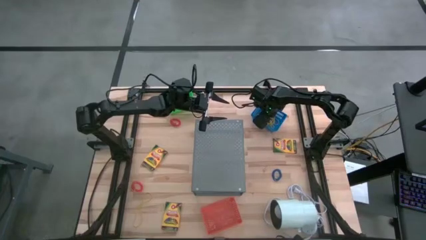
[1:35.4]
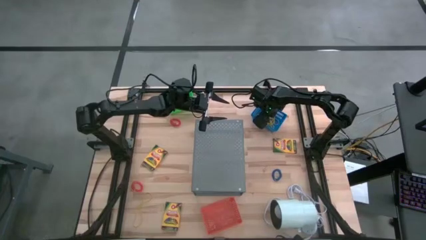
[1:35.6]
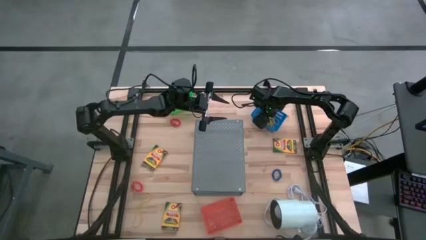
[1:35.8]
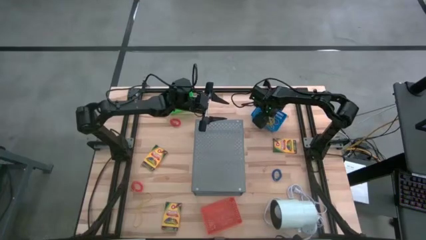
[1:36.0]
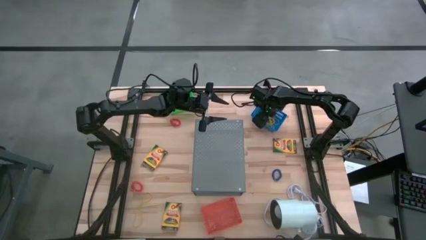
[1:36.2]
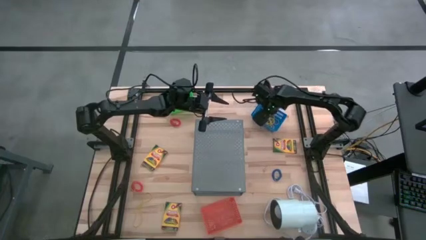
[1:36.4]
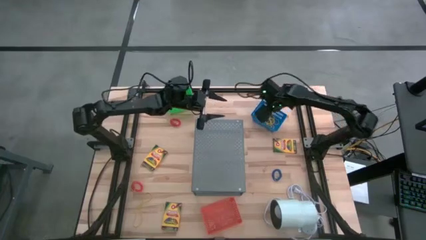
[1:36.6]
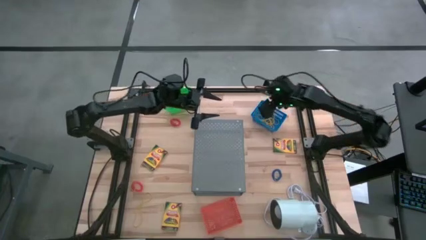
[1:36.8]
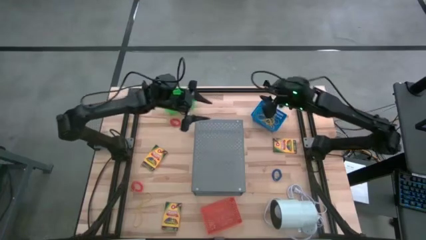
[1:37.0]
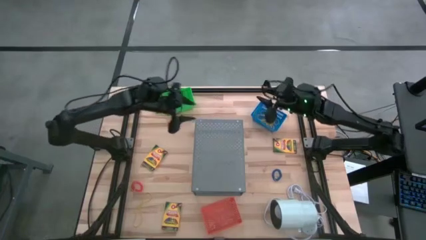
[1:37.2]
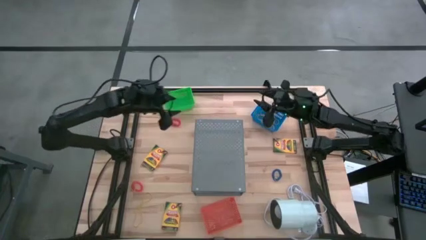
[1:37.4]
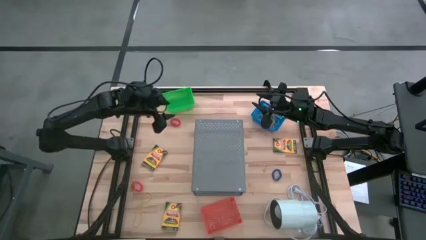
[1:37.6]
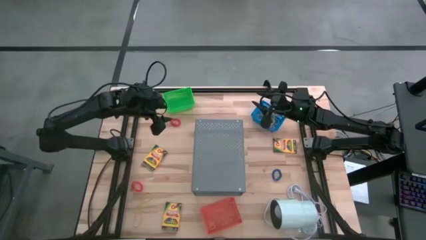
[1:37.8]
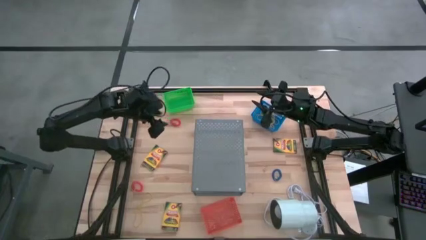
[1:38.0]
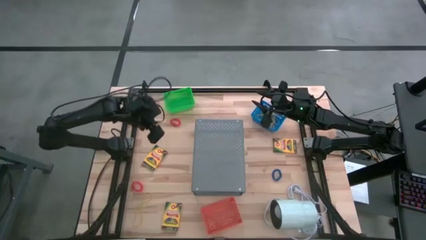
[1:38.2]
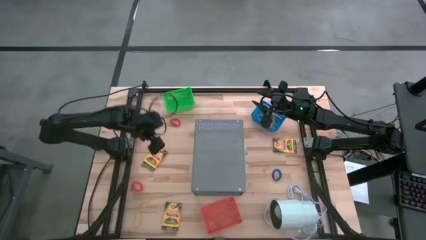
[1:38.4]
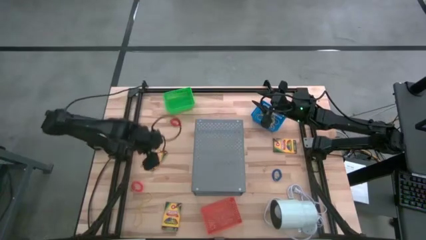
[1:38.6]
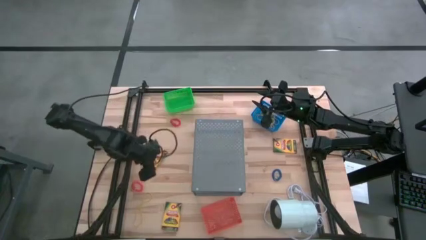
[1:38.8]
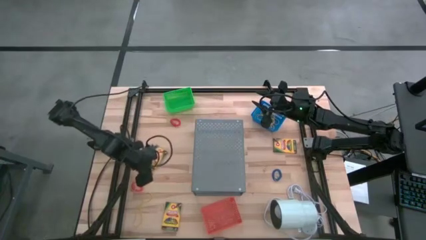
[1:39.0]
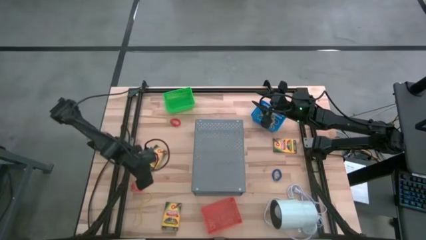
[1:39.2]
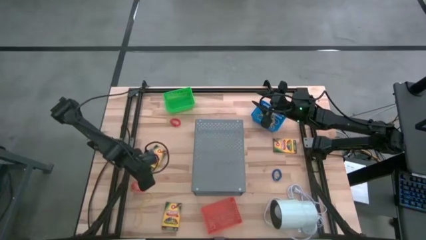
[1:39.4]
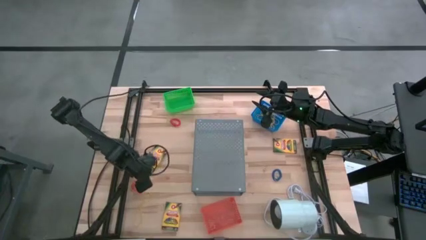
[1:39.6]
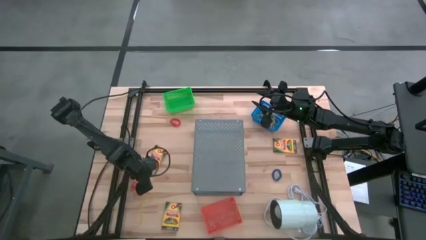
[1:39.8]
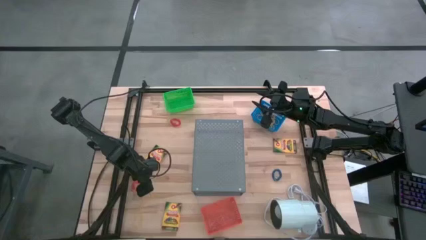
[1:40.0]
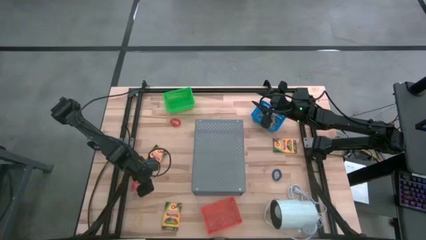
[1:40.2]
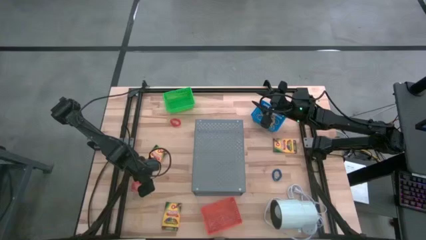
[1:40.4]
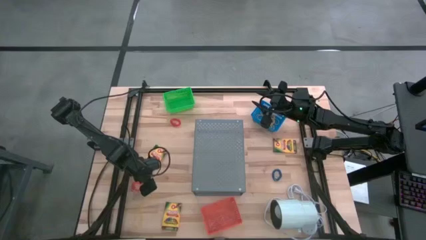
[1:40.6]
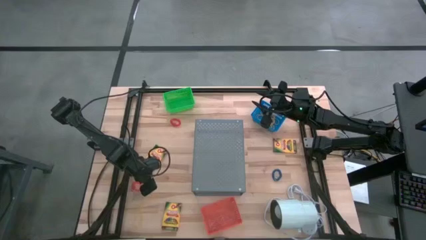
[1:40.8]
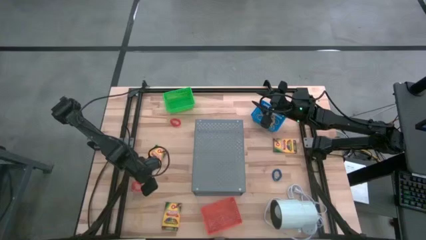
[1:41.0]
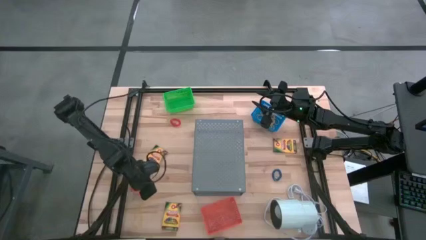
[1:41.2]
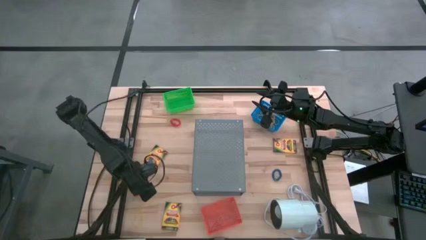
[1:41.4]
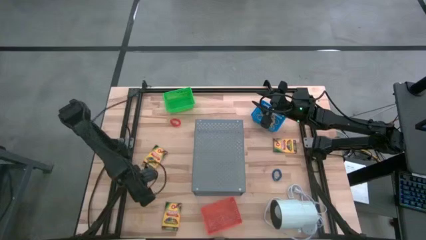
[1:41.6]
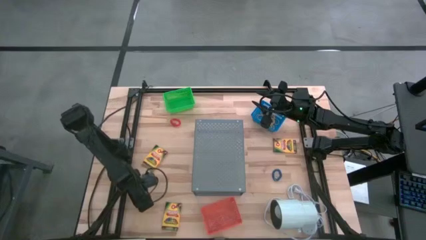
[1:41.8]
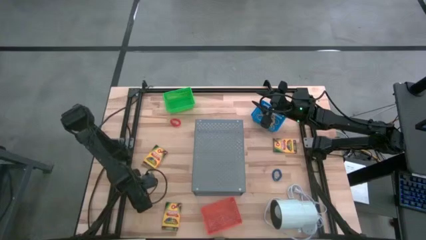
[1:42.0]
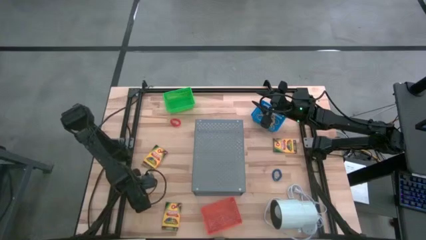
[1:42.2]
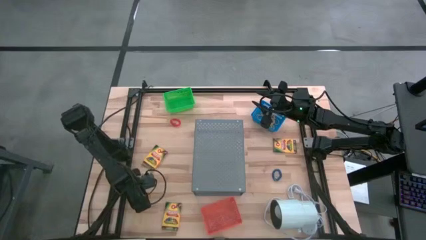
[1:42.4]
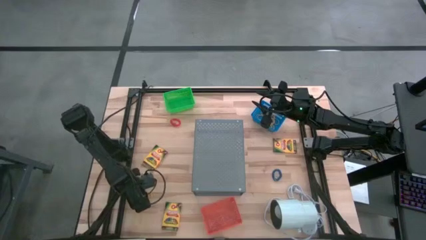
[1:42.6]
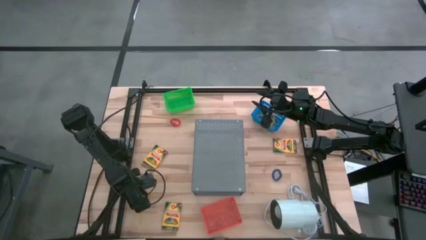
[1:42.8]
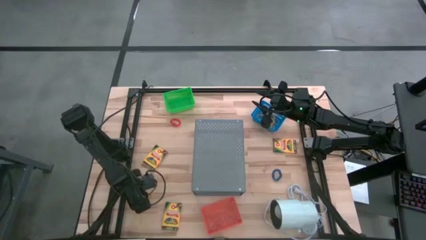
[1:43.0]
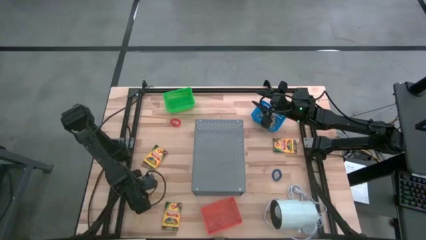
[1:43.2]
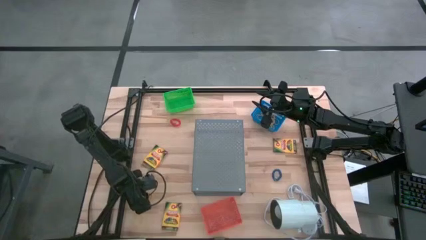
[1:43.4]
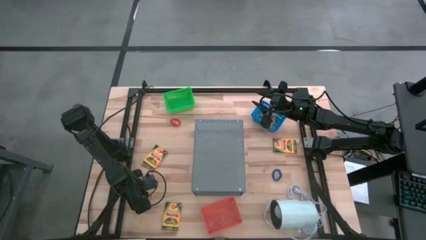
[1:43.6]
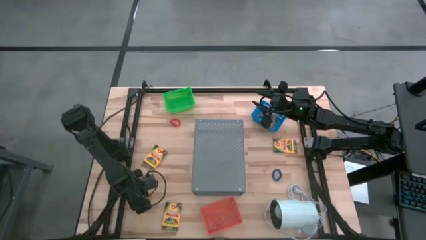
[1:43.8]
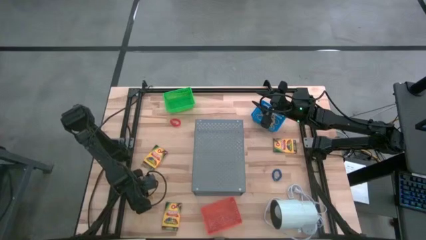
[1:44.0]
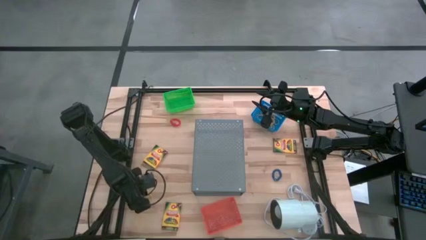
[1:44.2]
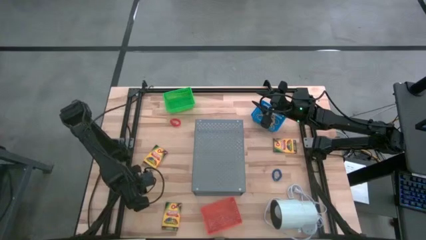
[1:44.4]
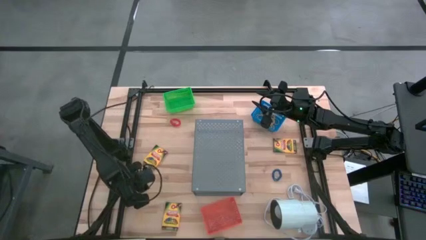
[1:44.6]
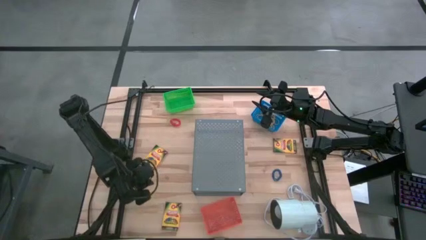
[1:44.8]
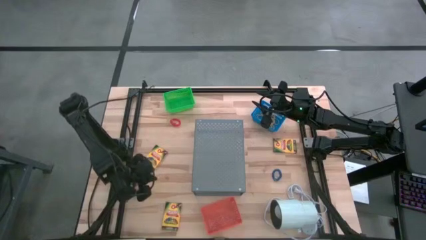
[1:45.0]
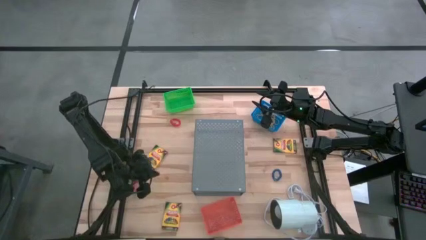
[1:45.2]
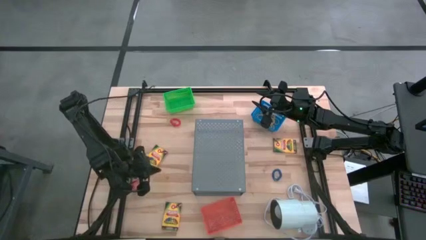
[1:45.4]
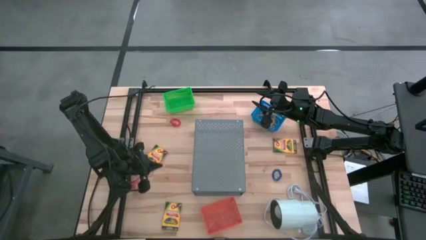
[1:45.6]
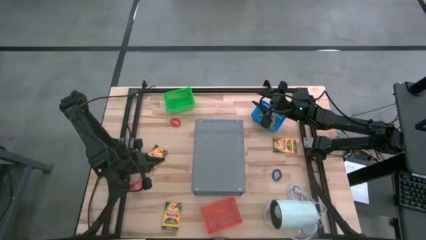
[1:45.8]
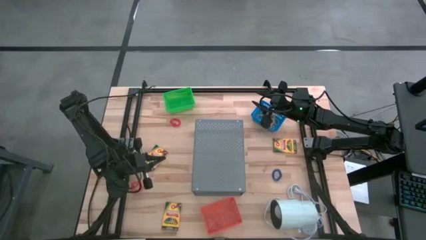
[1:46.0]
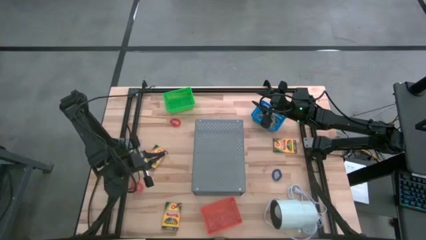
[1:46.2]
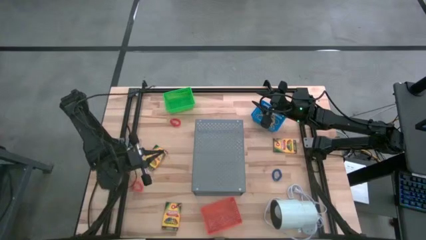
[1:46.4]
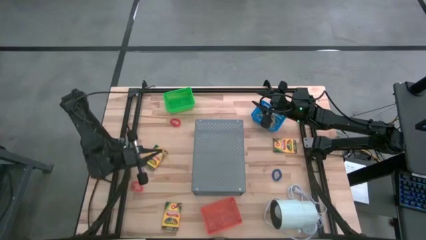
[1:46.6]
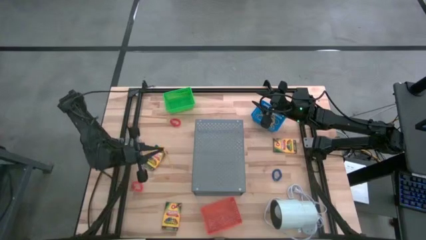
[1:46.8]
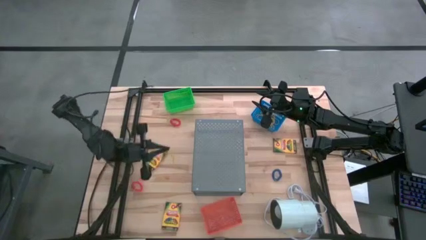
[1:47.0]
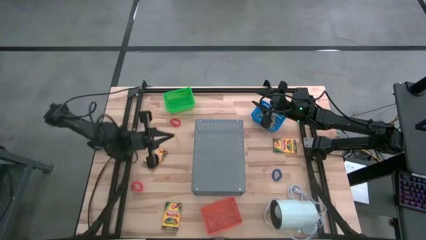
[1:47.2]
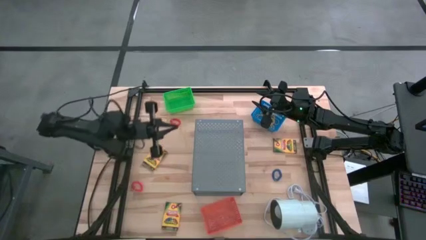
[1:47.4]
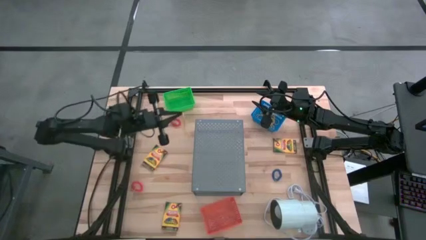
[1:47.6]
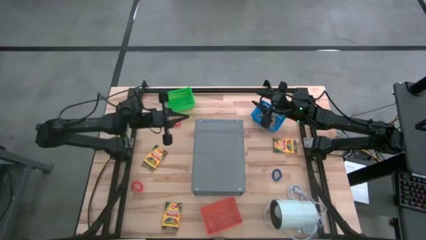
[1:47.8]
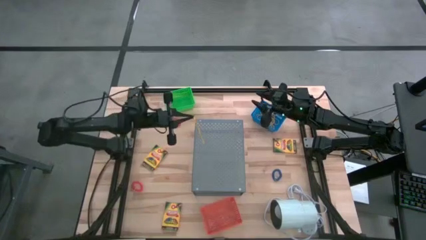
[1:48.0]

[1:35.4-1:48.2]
Task: Pick & Place Office Desk Supplies
Put the yellow rubber band into the blue basket

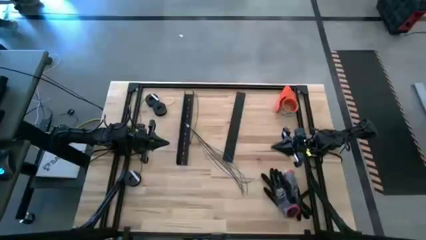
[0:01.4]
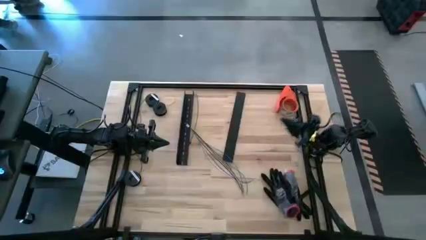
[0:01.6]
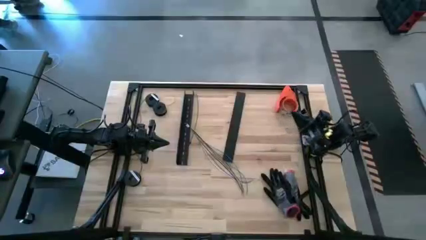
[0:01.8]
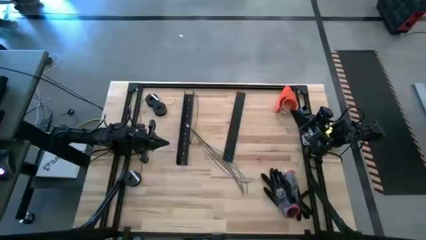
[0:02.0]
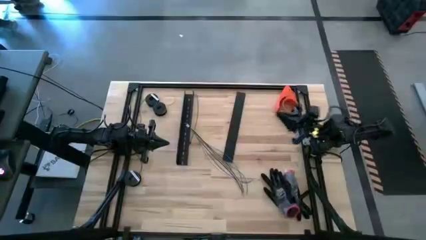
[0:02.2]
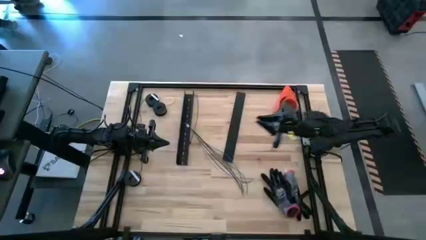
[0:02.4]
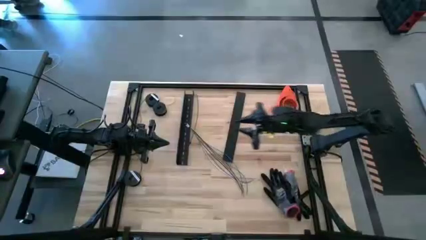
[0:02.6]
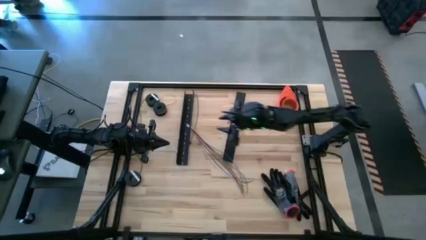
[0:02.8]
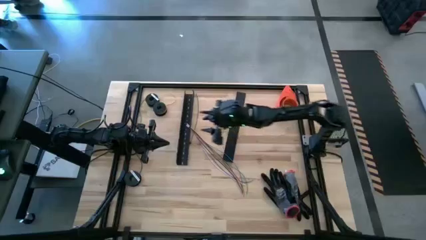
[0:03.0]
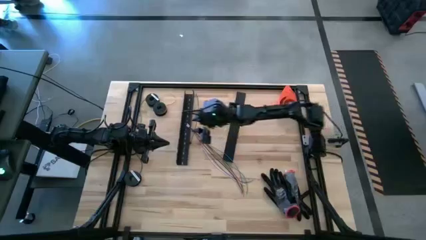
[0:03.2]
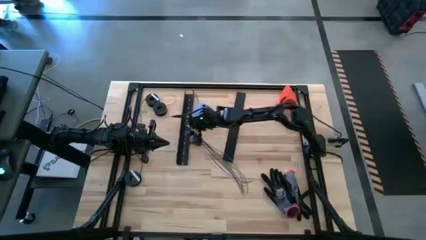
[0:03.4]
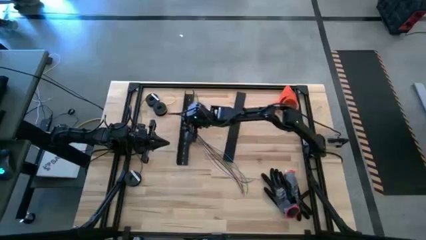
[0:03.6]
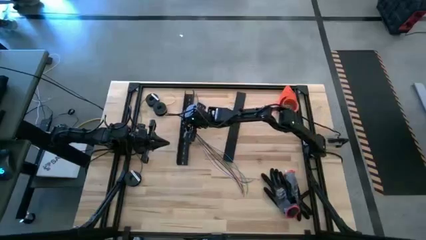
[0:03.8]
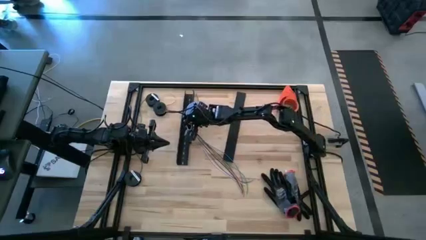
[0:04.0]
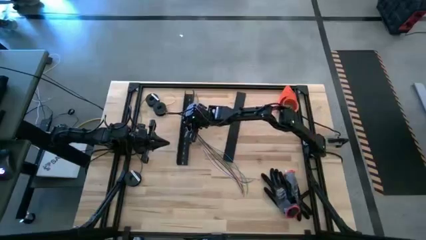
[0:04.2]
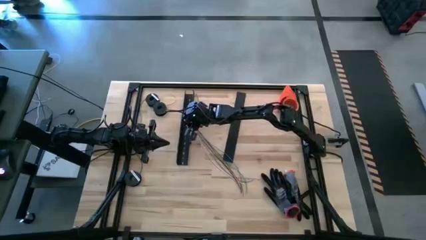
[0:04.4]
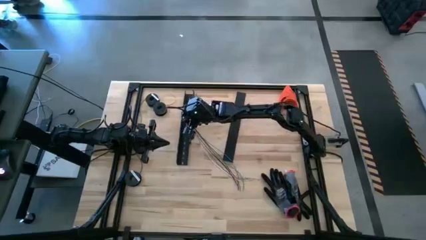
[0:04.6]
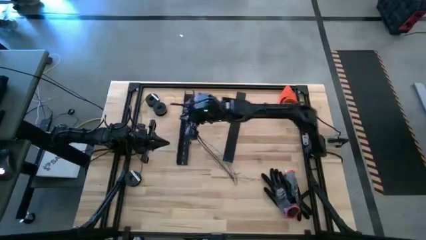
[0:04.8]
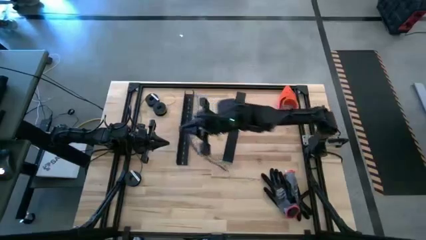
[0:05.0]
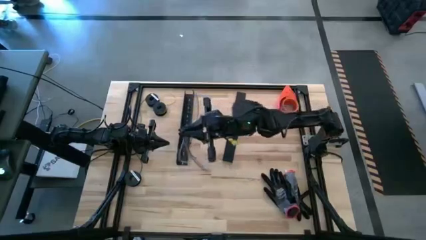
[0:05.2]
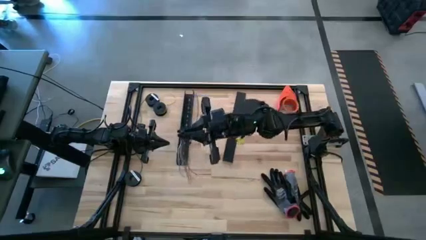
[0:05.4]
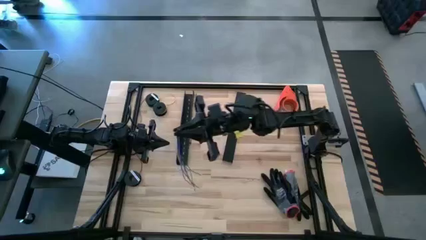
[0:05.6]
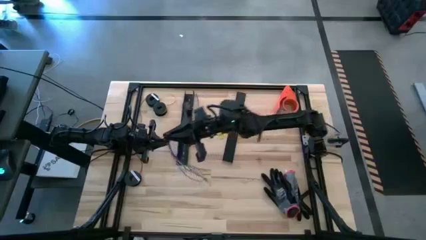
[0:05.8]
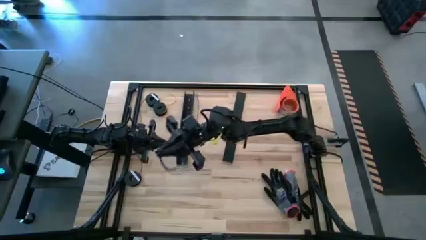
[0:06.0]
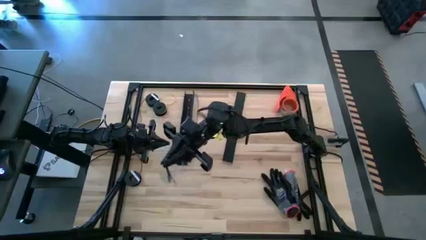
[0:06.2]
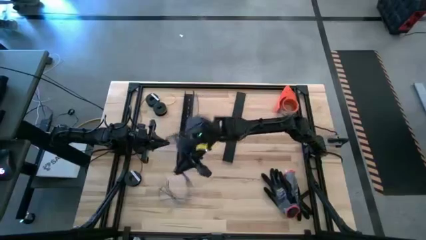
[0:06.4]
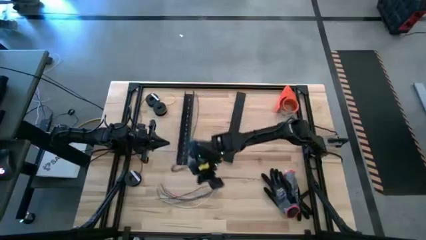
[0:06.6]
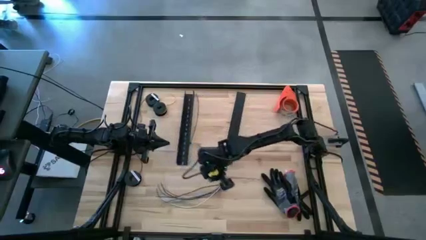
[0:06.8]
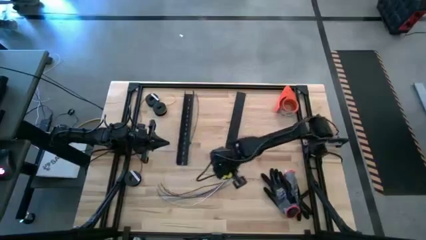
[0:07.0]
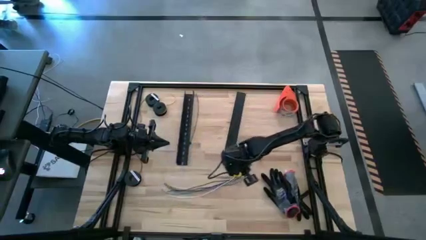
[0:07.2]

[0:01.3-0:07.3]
Task: Ziptie cables
Move the cable wires
